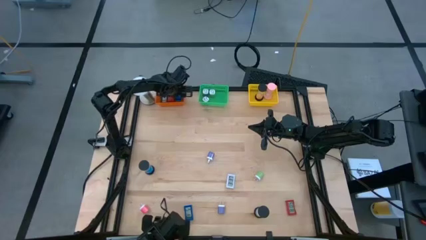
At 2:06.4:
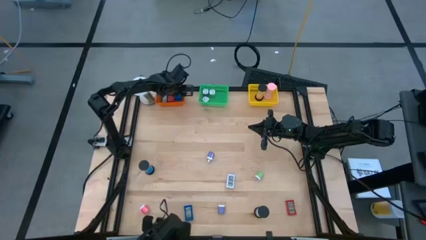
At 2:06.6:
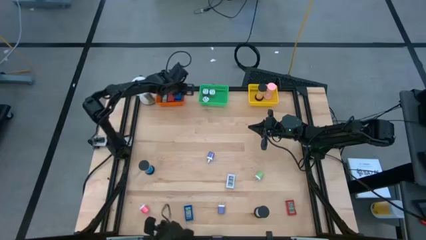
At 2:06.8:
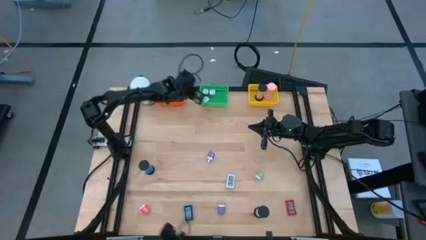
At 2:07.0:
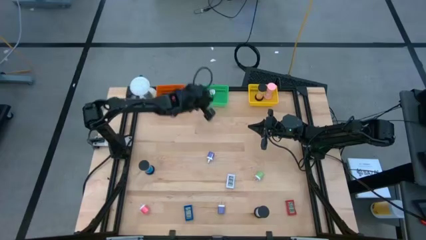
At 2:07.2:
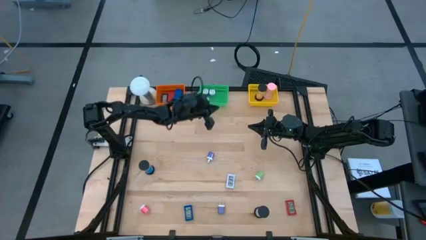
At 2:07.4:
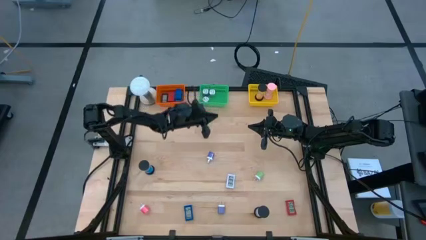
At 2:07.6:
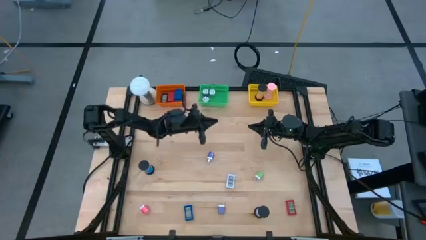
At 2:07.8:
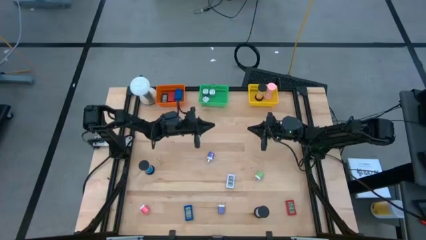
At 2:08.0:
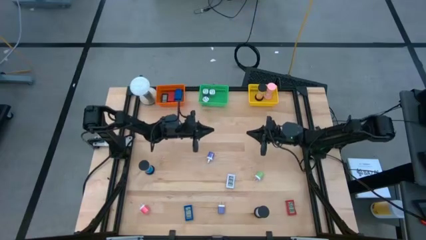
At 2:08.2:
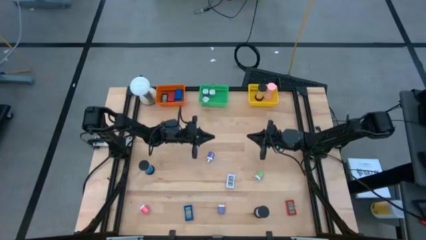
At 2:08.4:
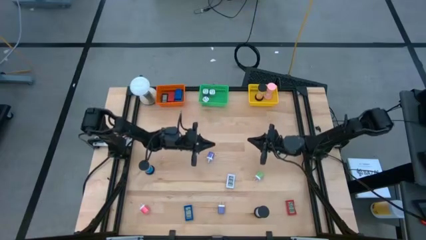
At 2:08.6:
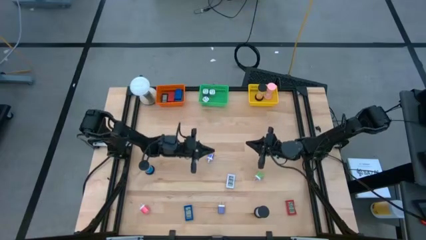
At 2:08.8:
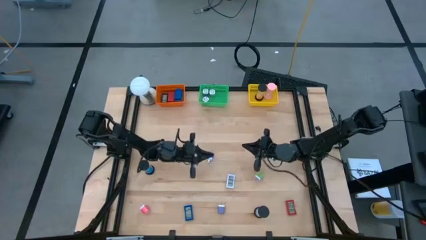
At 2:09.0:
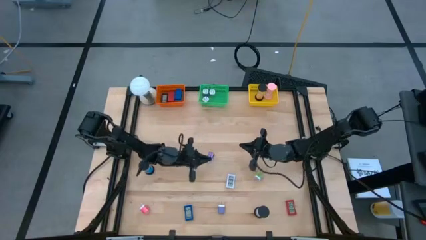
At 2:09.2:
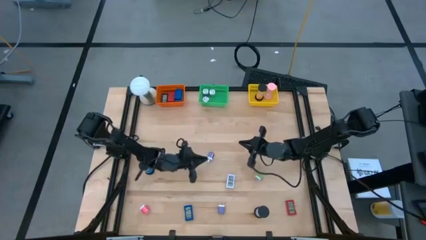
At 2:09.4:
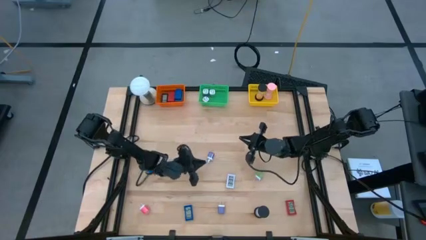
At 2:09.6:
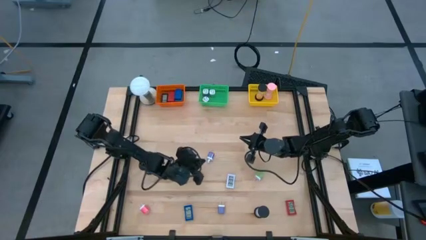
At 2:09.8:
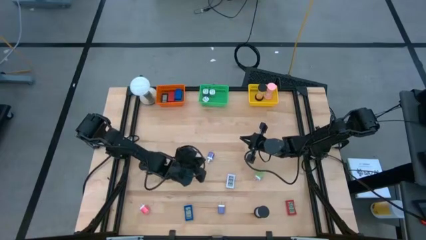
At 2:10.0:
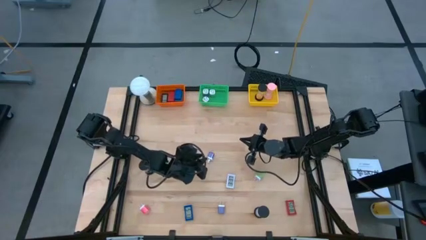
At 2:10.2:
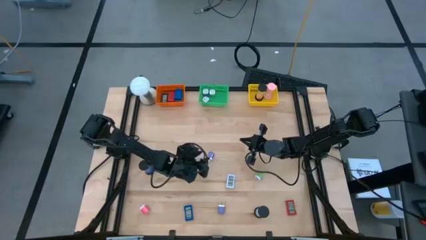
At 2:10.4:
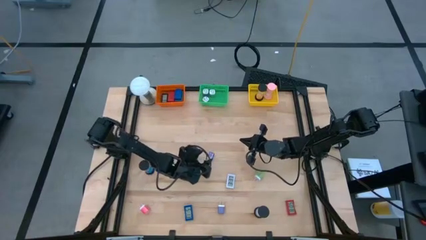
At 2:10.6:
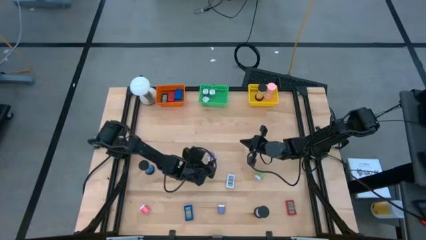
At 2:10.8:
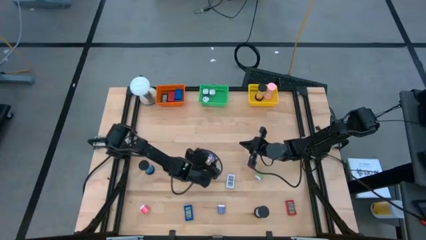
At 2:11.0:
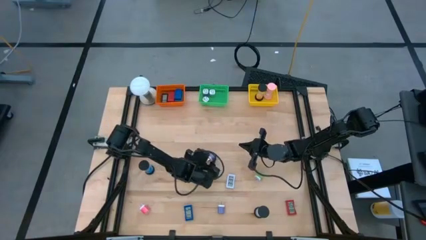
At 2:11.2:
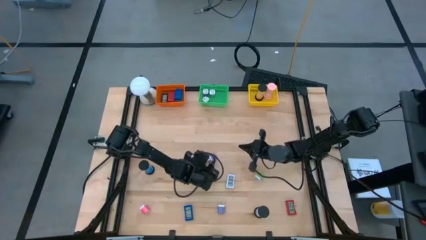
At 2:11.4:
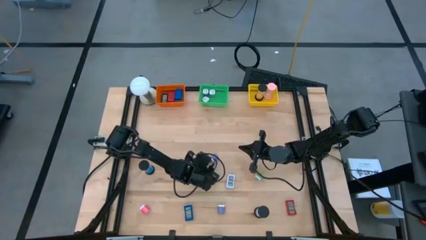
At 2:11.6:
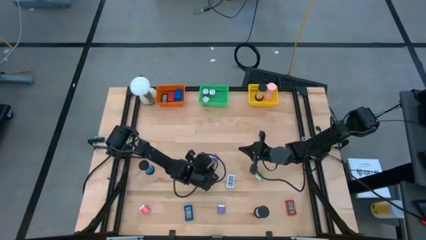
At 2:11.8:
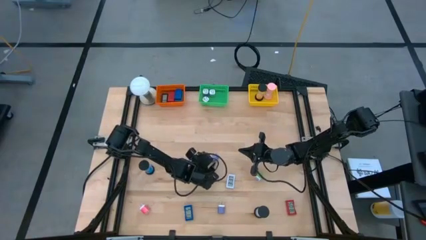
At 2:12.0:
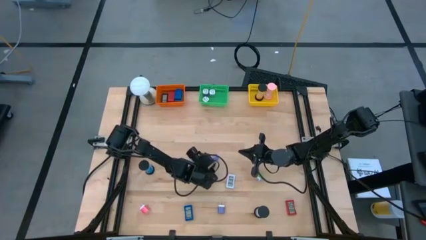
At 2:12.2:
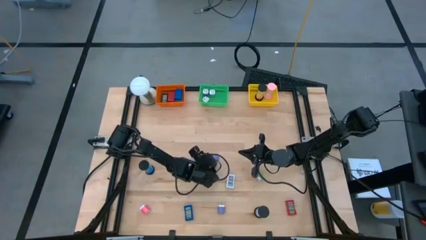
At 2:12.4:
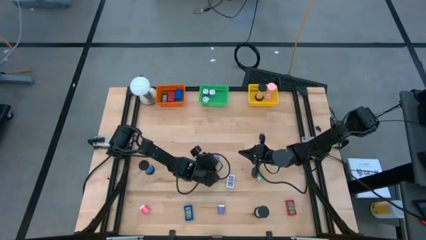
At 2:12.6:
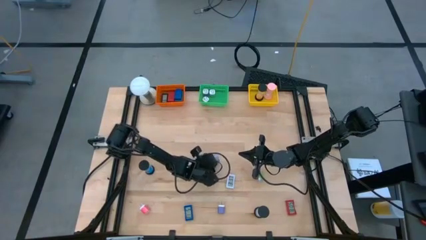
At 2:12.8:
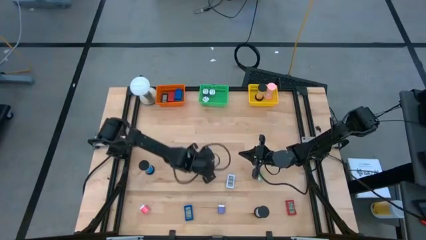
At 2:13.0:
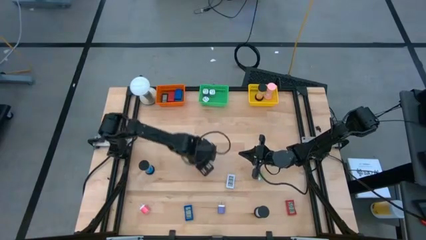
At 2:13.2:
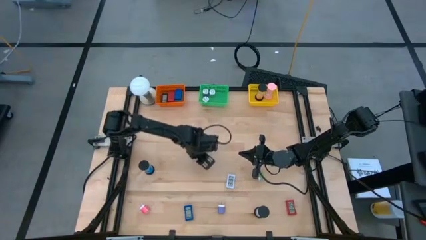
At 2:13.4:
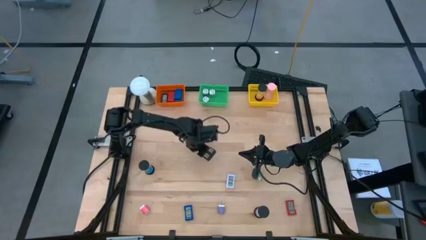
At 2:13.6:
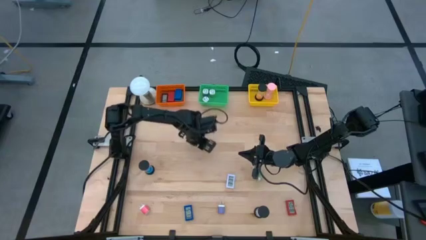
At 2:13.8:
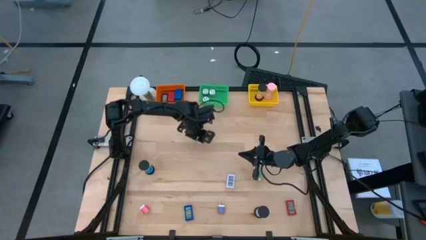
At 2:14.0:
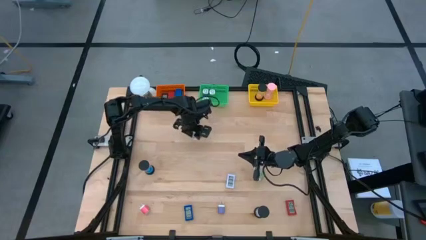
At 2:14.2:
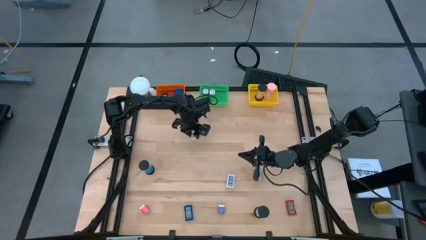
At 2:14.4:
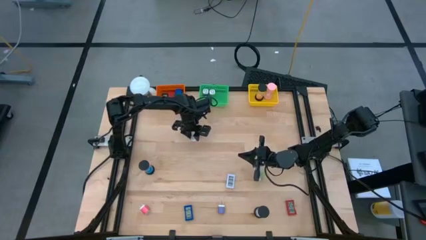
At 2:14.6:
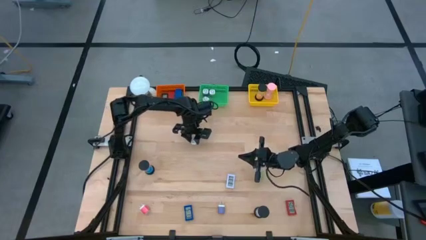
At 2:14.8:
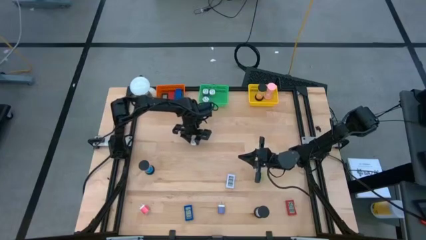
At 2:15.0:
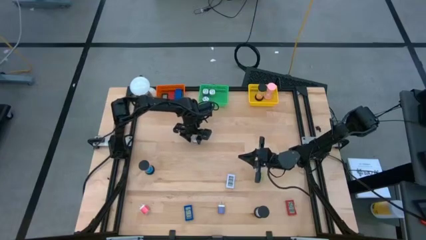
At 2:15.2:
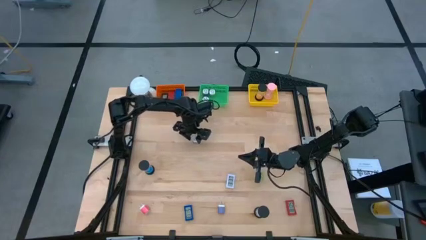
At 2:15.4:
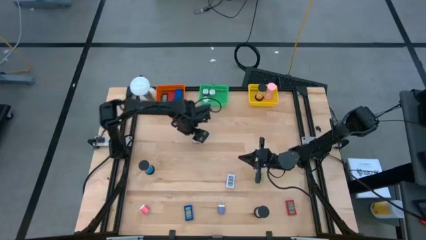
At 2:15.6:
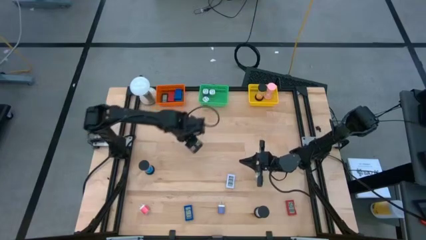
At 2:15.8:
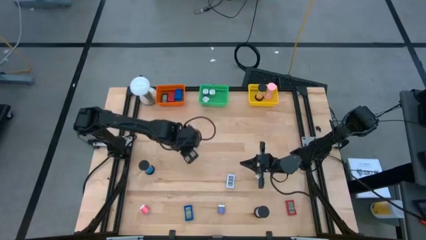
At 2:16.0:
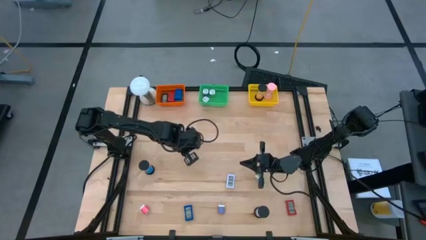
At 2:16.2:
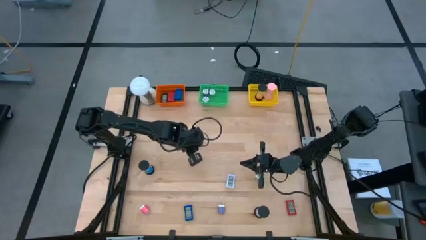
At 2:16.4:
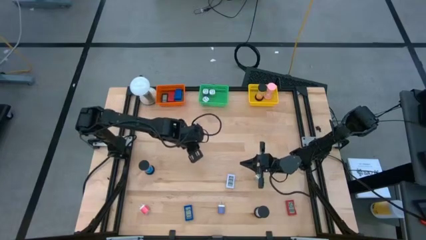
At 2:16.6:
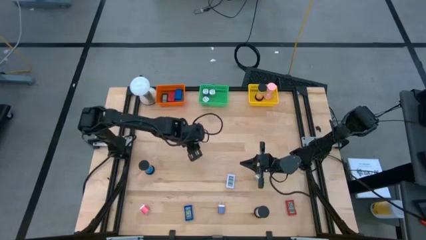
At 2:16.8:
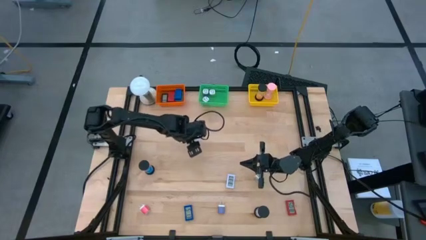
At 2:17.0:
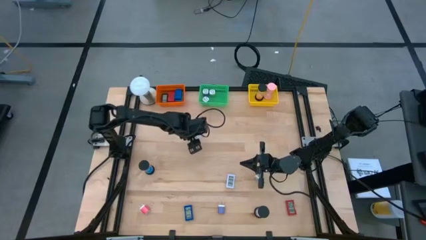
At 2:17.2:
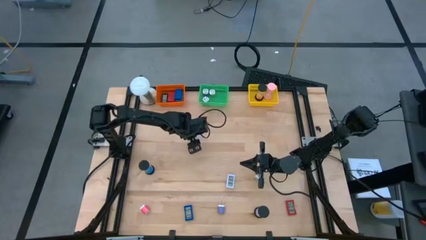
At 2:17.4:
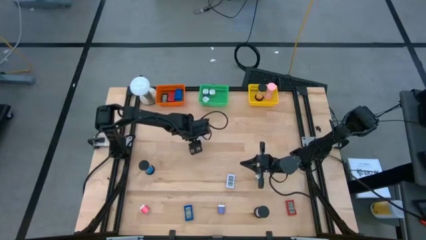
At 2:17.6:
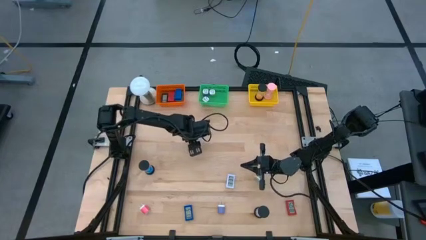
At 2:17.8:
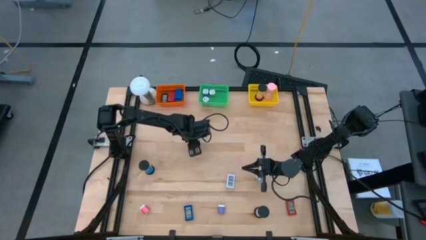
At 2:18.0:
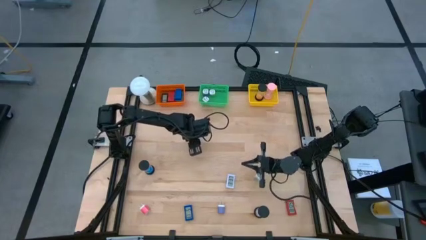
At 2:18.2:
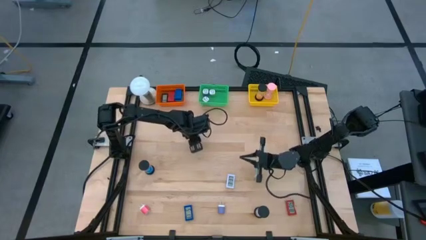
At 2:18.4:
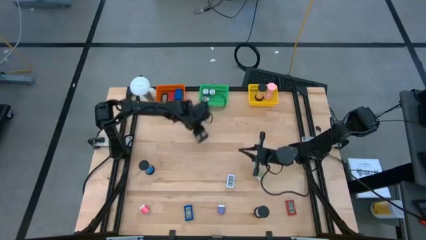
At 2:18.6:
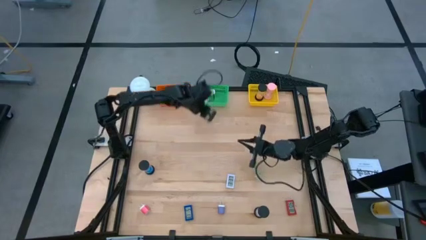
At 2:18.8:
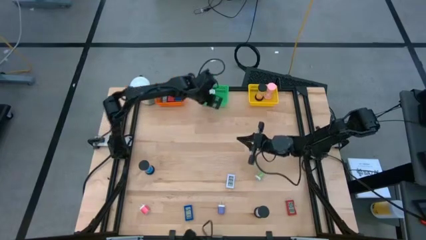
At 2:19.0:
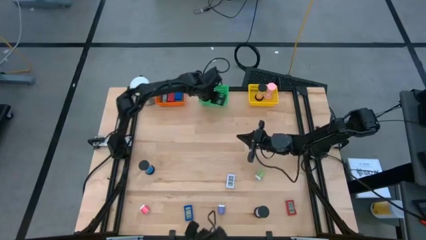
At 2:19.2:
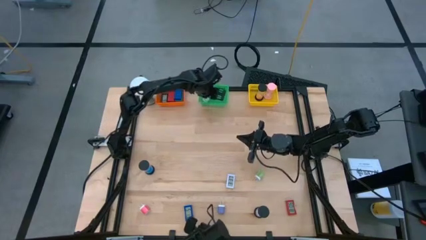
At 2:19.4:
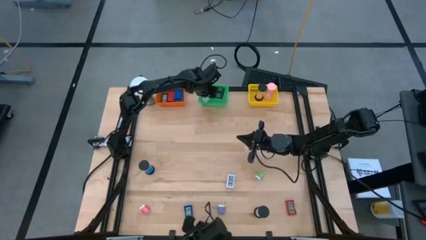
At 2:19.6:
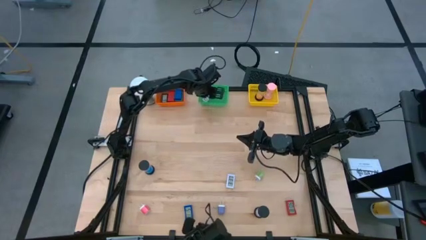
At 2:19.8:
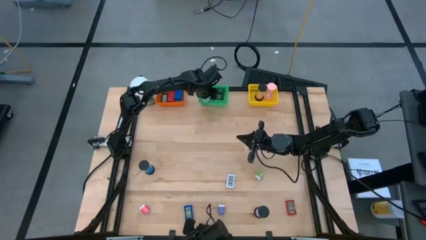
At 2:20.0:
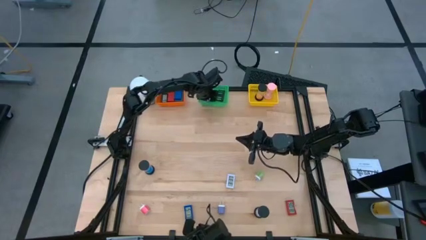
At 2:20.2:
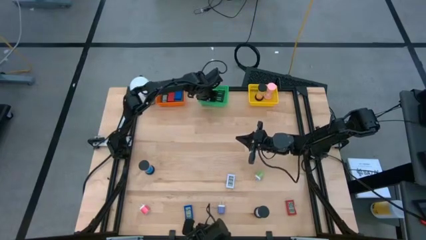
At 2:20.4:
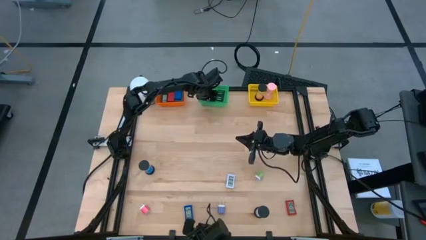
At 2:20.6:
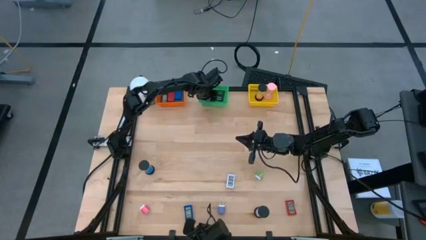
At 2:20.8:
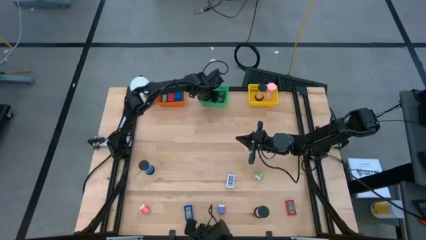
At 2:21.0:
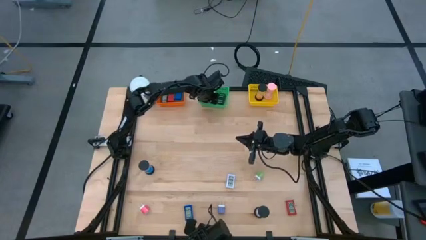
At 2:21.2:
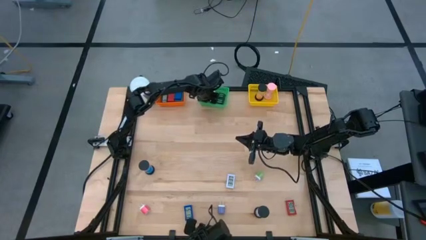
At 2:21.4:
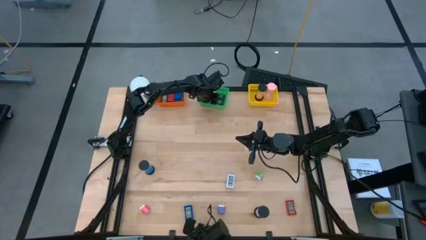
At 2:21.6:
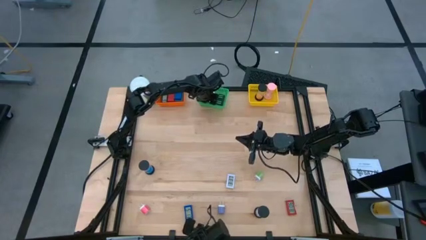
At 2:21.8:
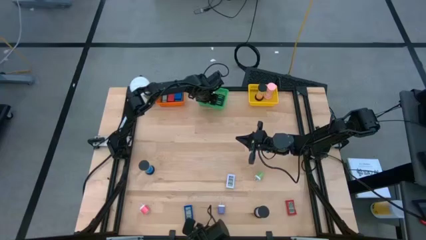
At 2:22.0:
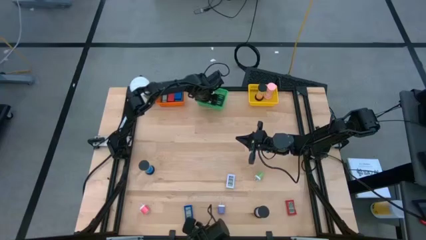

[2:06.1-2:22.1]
Task: Pick & Place Office items
Put the blue charger adapter into the green basket

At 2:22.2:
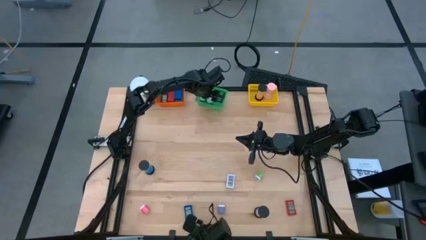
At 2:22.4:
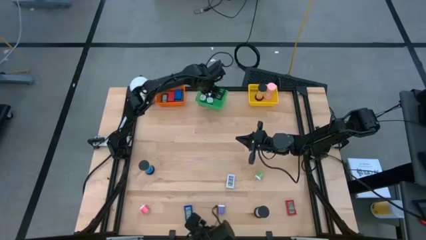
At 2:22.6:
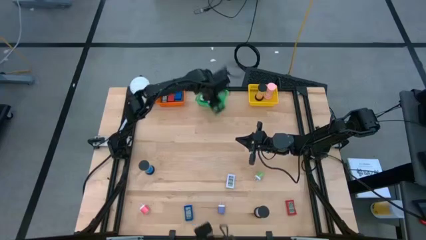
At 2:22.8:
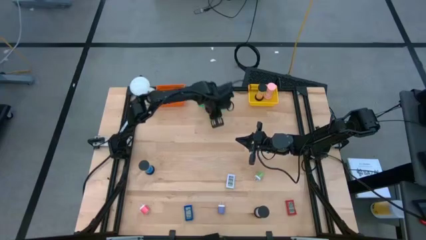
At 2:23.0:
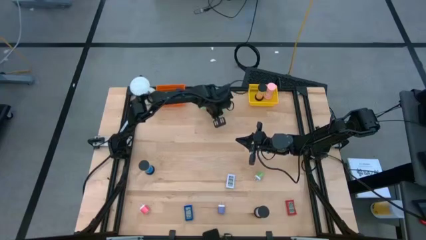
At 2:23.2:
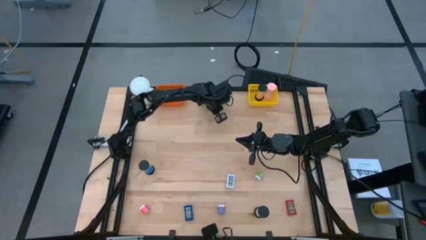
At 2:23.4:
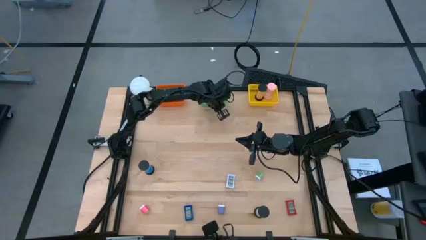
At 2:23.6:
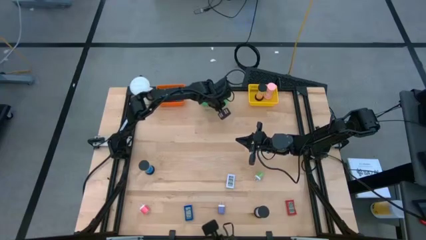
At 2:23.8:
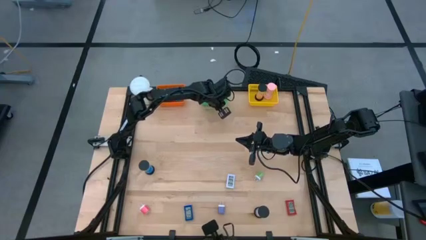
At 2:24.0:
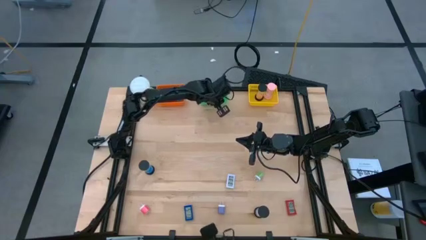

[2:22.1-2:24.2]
Adjust the green bin
